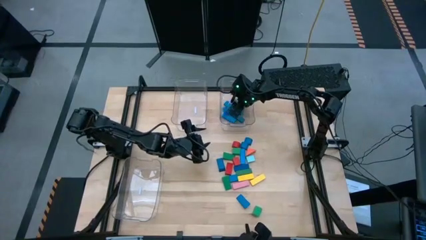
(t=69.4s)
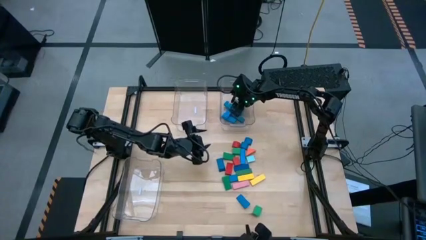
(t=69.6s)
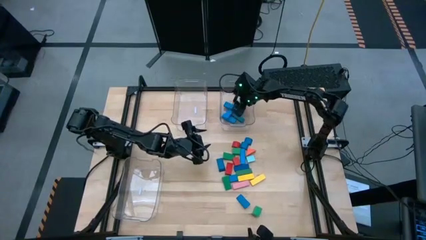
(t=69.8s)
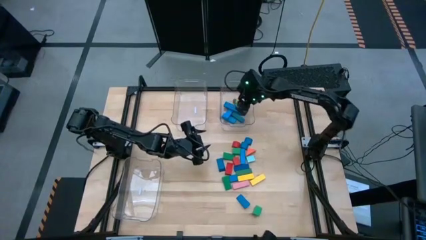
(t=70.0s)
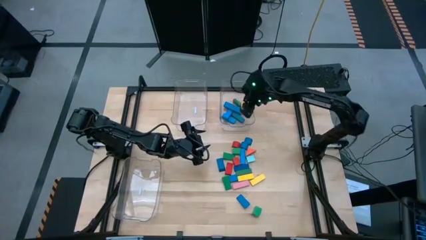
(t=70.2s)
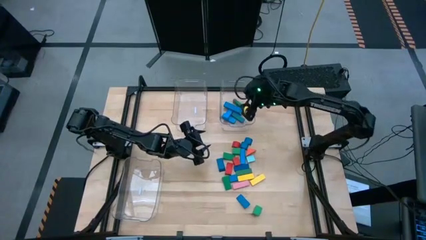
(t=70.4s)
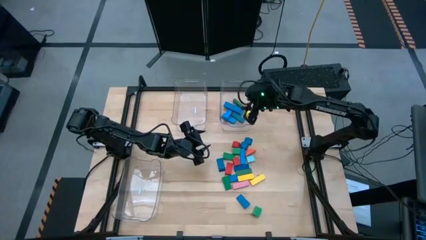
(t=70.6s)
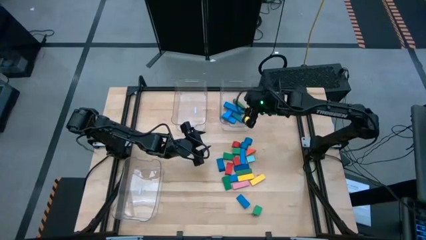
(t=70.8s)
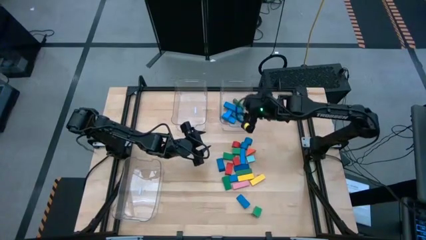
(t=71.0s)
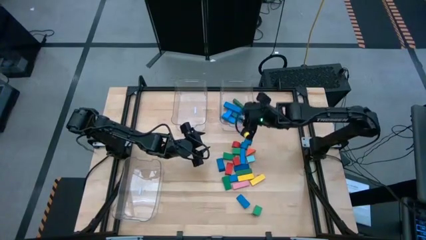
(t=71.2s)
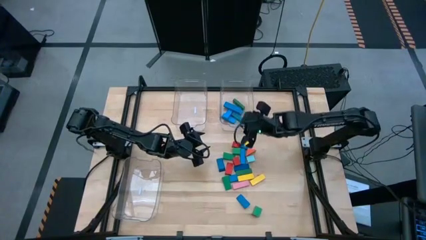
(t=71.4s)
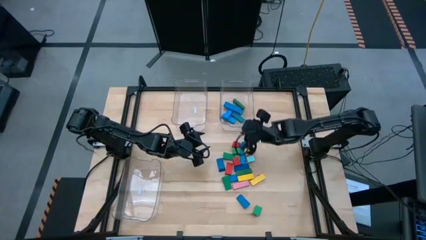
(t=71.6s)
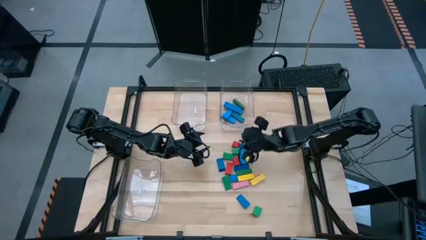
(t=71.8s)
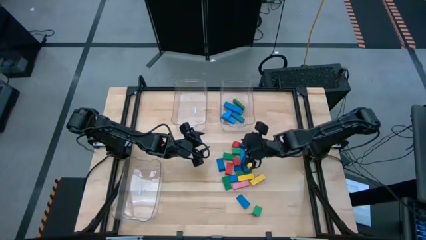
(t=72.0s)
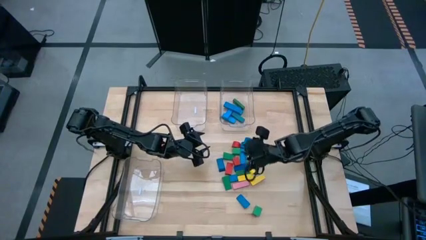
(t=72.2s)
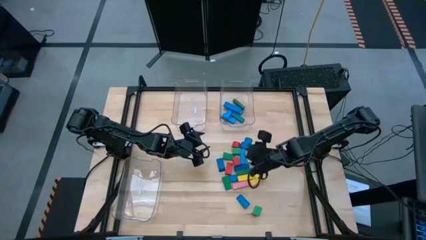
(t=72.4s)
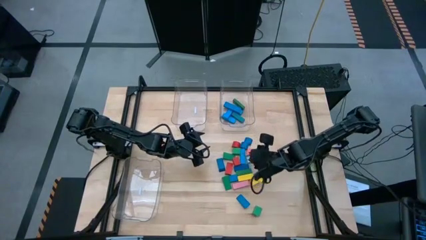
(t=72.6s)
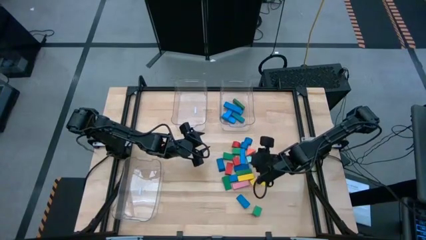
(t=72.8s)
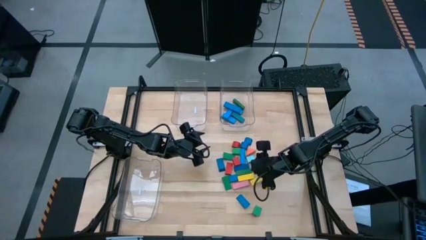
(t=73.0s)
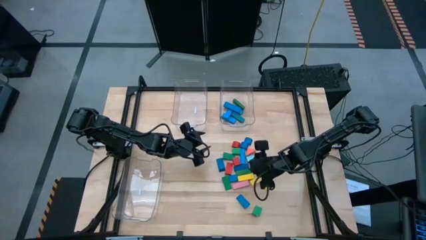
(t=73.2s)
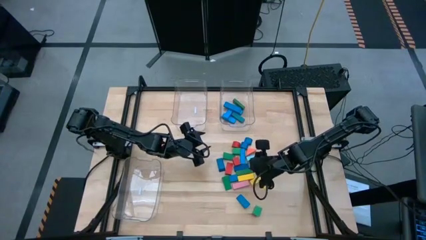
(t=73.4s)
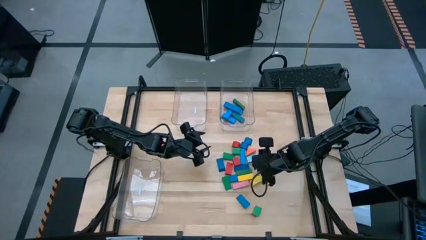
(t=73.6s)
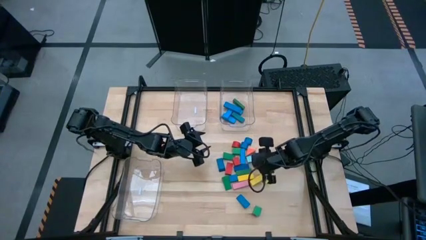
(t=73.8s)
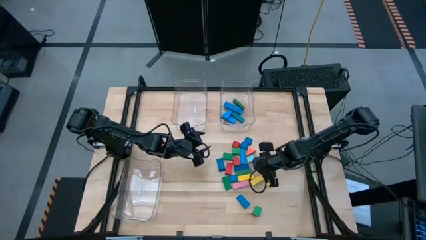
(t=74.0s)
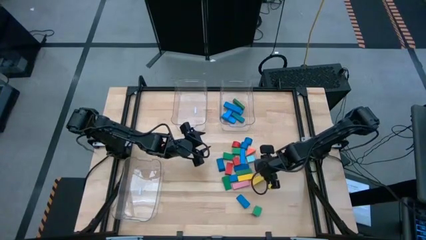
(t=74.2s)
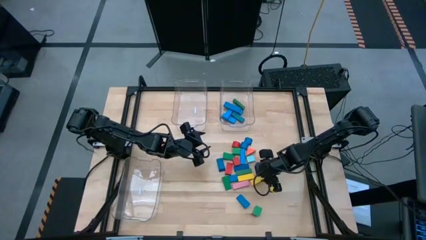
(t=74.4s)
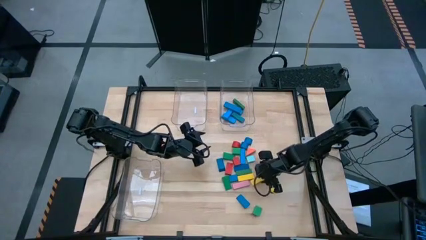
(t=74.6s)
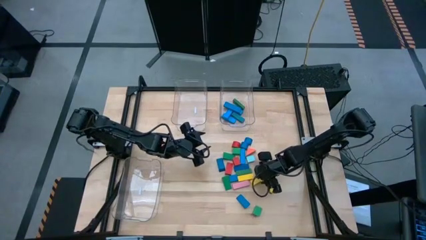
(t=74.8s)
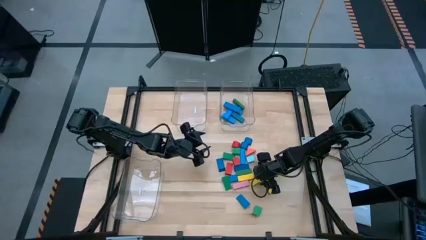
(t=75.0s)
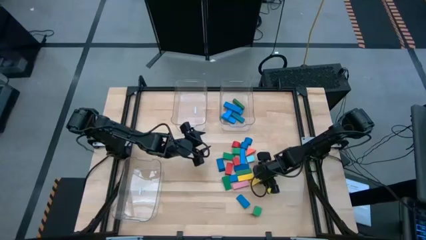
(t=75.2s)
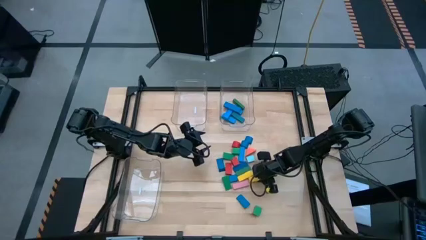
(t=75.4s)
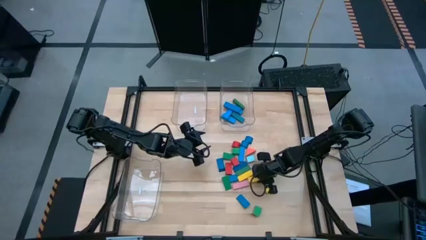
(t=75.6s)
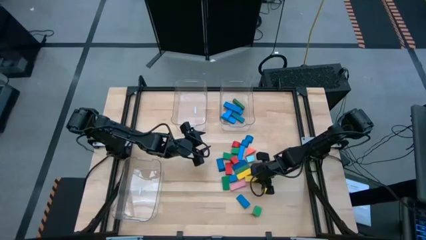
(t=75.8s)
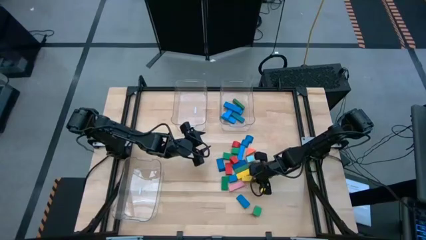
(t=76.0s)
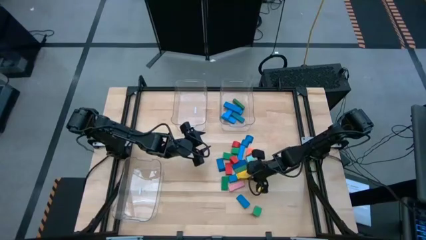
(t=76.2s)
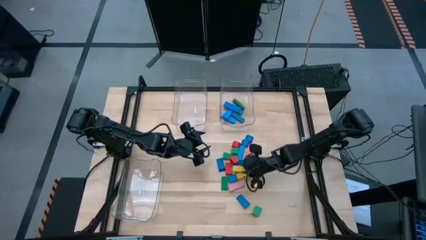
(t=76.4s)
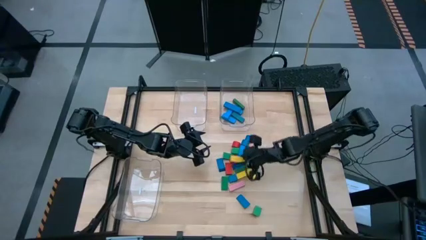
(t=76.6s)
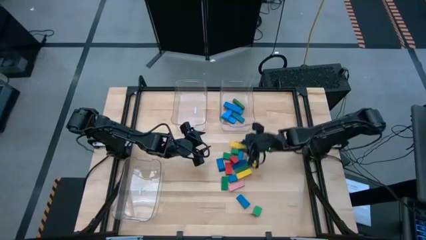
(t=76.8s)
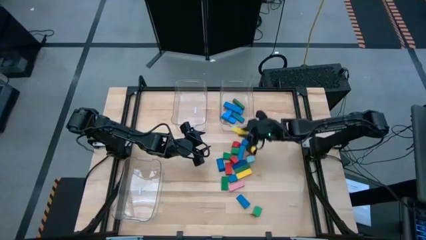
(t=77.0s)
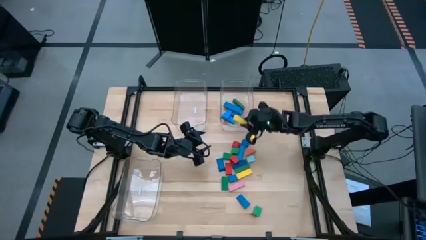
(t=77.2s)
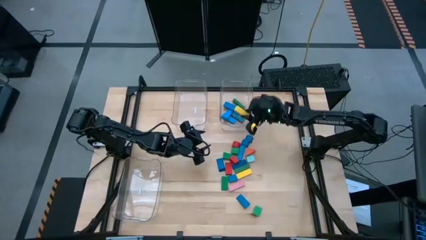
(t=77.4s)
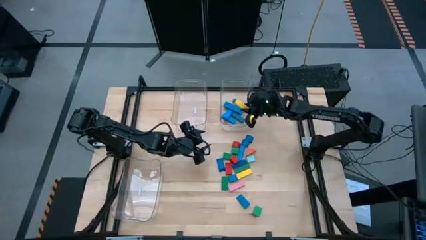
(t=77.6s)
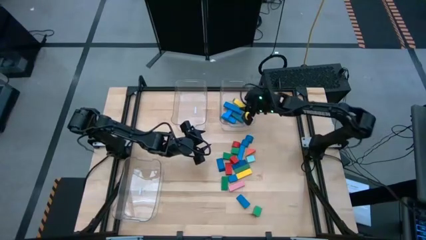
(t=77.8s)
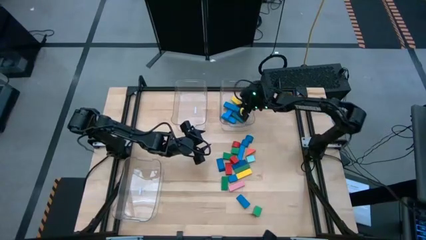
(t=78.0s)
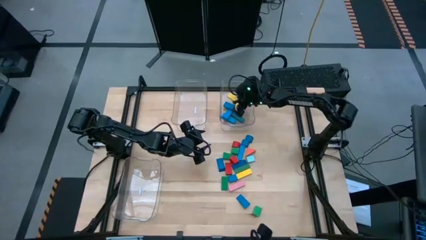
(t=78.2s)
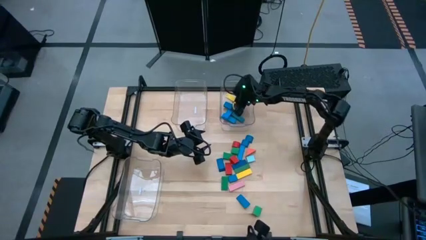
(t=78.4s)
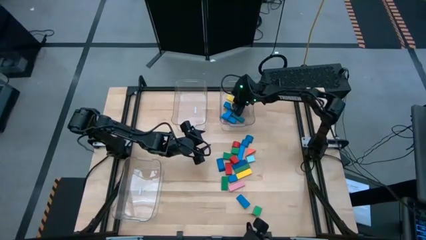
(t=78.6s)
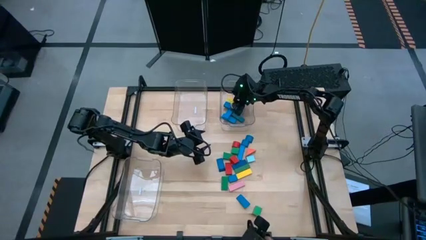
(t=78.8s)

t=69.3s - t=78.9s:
Task: Sort blocks by size
Put the yellow rectangular block into the top right transparent bin

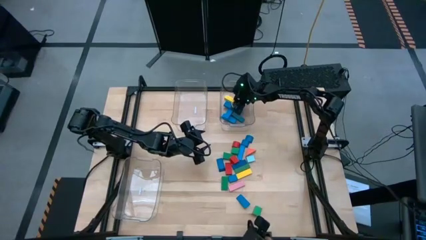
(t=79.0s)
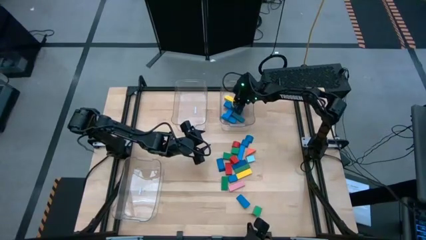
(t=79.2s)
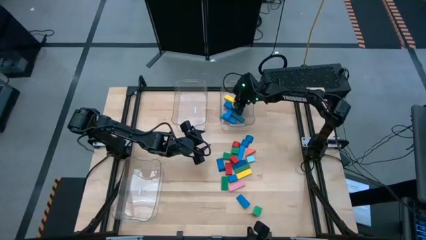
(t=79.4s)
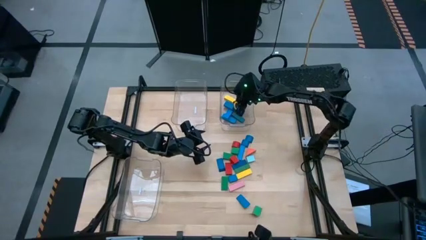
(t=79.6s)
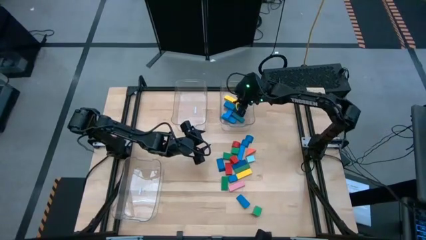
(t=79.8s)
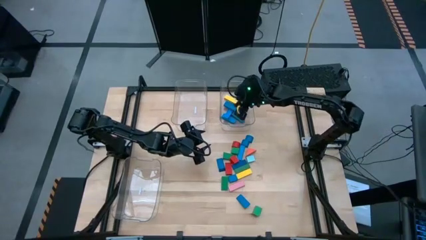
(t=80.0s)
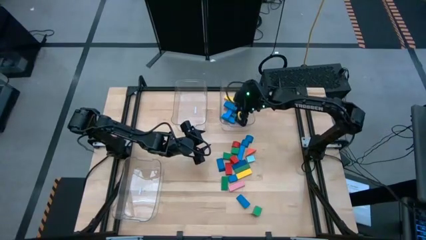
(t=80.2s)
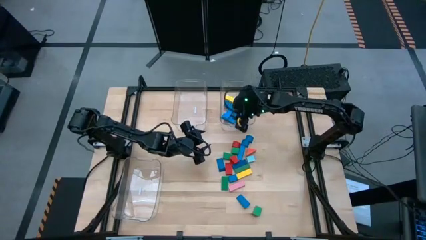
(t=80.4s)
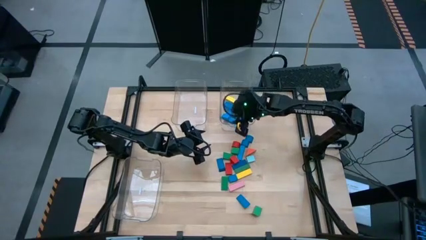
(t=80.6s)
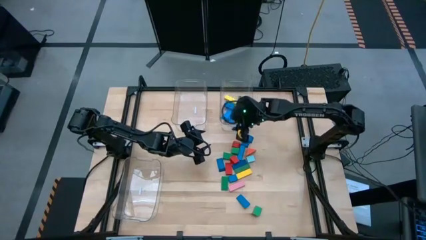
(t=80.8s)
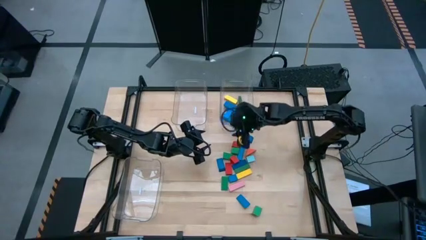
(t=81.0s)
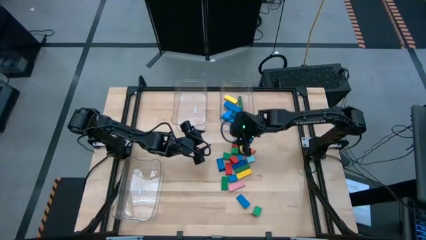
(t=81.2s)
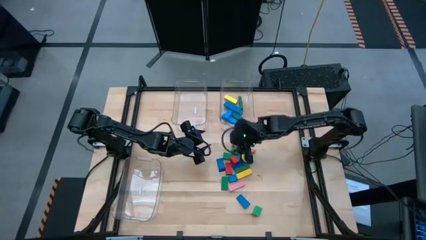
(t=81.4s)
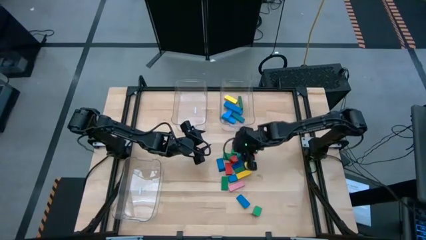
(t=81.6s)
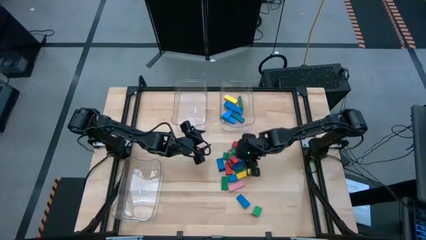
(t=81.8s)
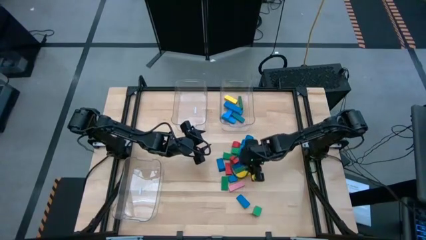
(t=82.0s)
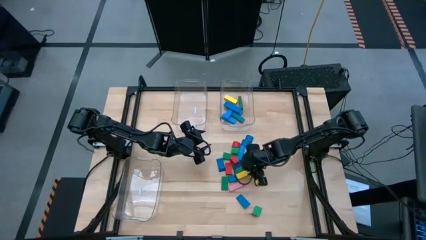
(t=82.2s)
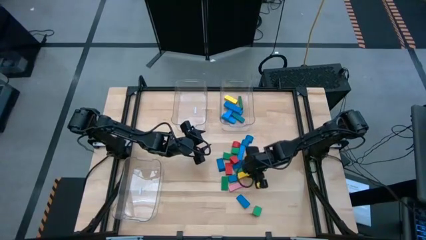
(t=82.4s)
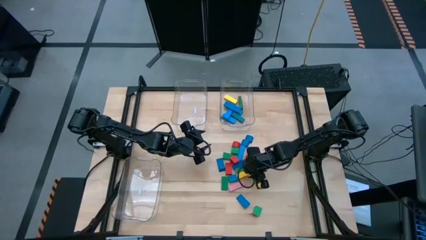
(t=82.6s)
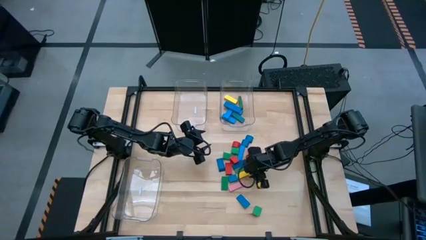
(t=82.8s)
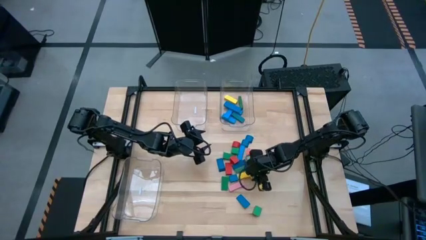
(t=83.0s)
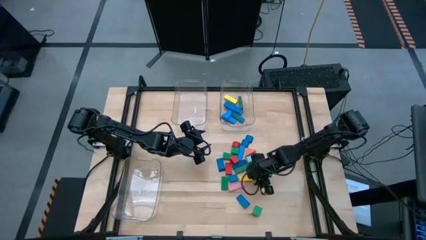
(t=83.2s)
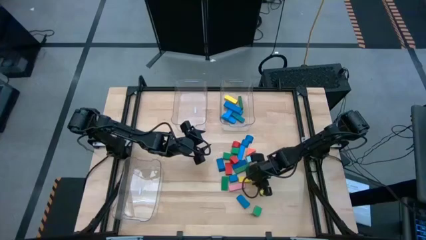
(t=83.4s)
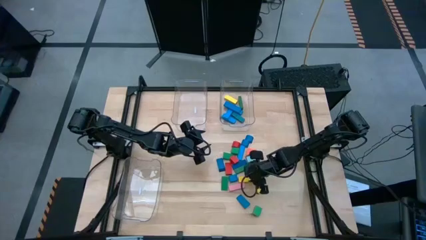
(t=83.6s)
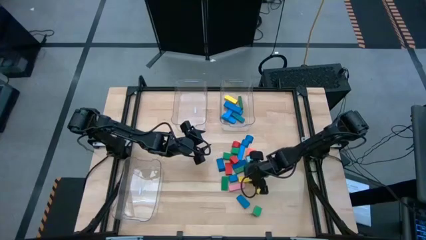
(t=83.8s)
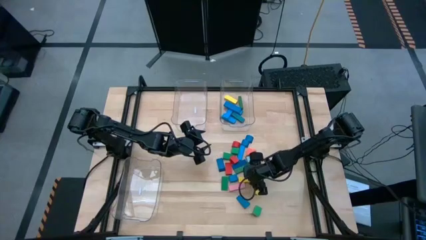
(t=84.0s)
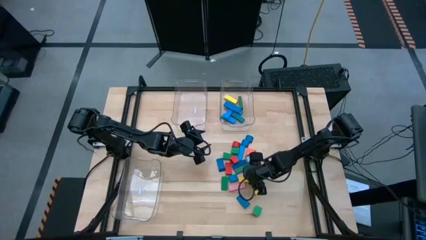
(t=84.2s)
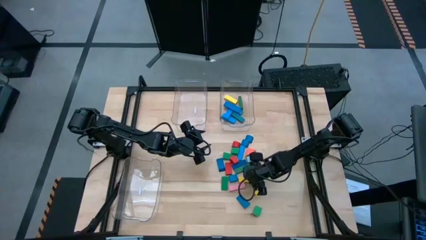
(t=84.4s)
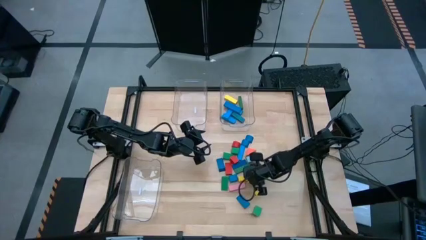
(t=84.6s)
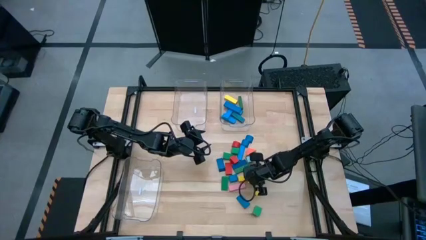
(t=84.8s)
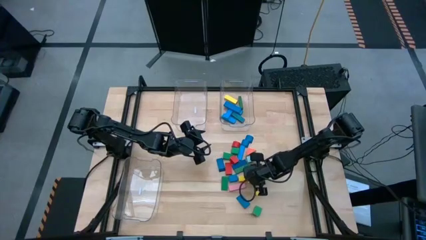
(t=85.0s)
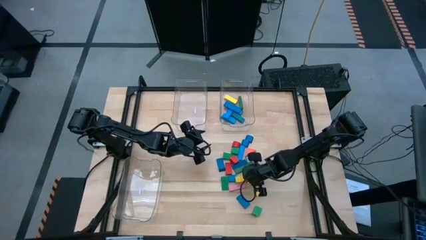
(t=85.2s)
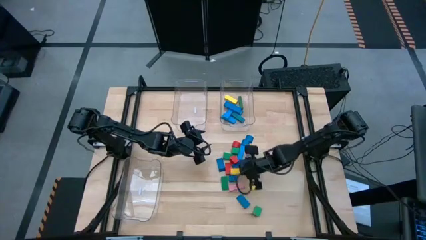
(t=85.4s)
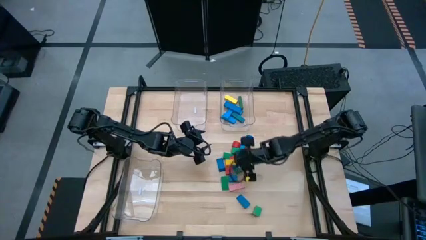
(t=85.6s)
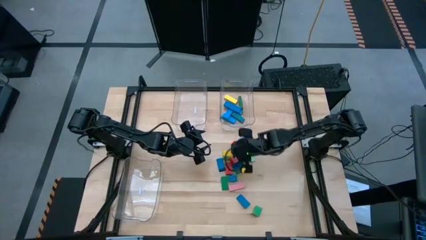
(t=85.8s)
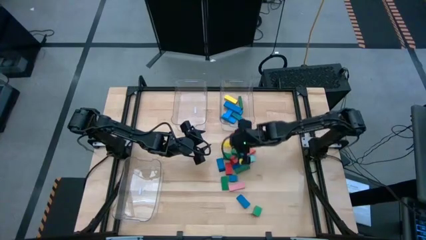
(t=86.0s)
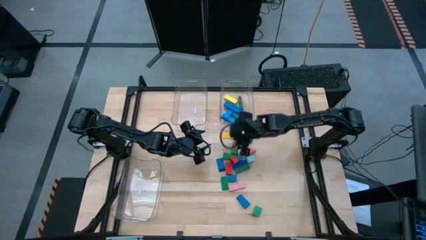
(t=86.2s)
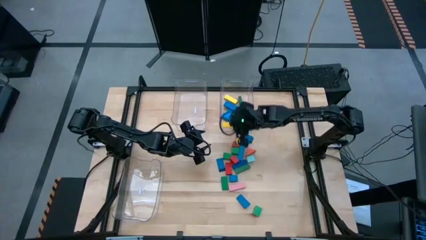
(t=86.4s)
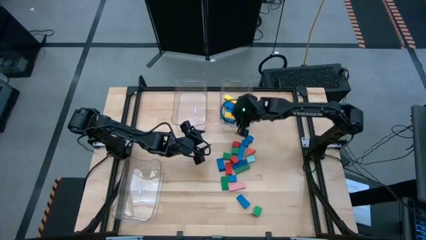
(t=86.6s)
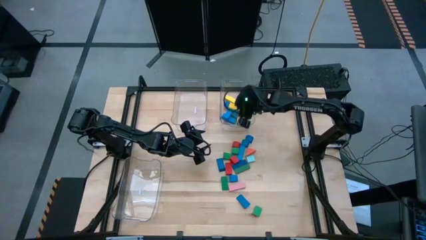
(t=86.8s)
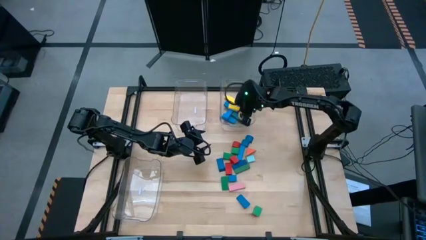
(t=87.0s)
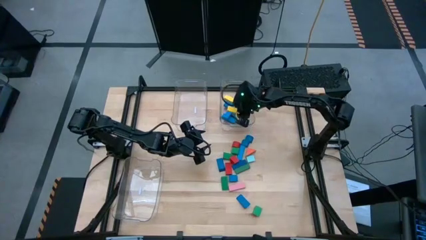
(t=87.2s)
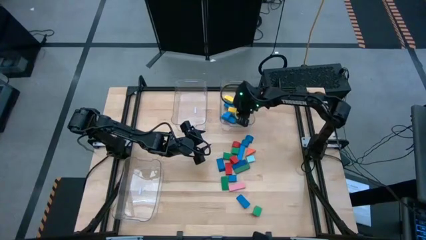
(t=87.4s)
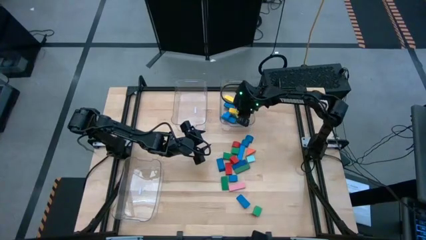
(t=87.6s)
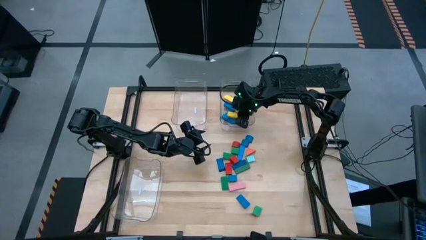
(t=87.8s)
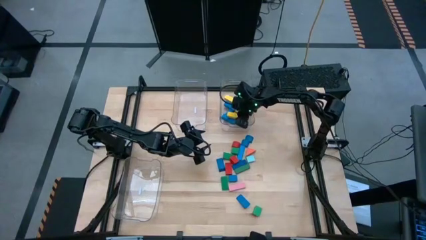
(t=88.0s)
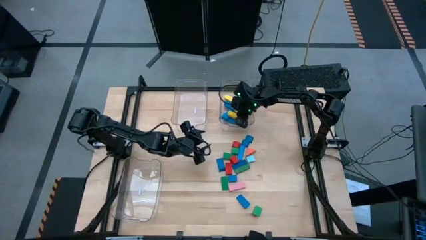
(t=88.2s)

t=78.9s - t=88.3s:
Put the yellow rectangular block into the top right transparent bin
